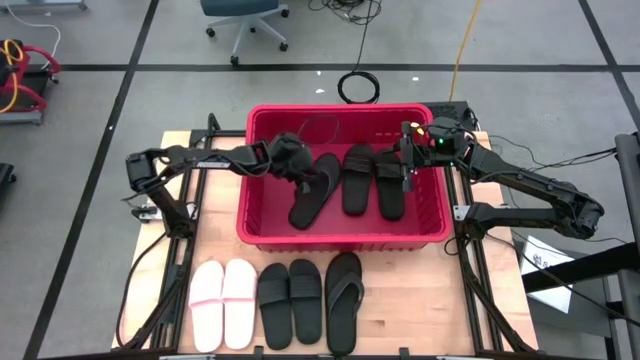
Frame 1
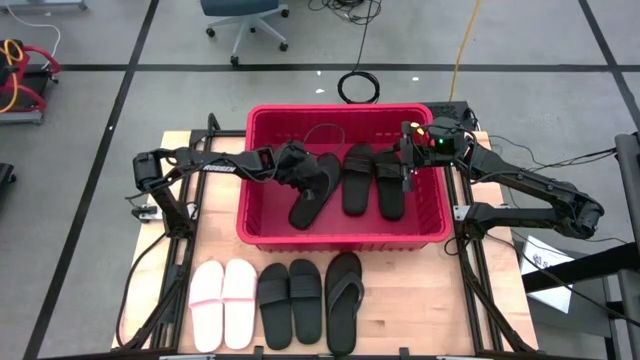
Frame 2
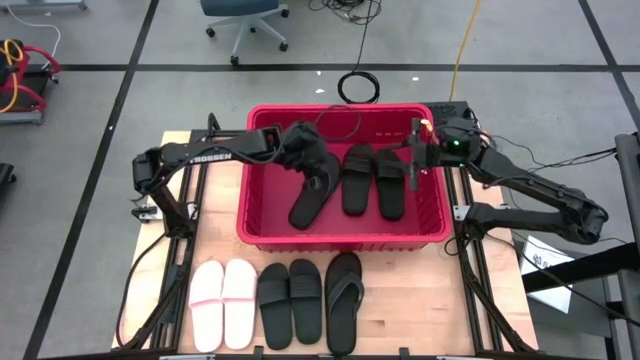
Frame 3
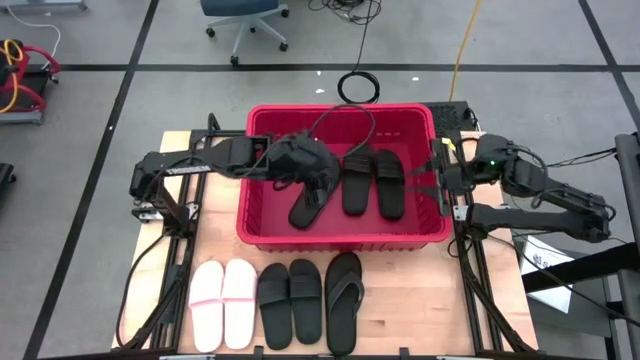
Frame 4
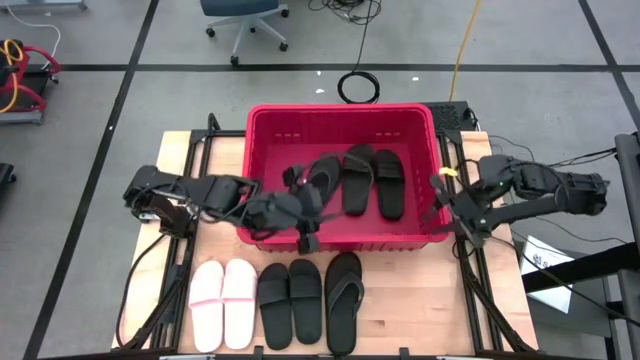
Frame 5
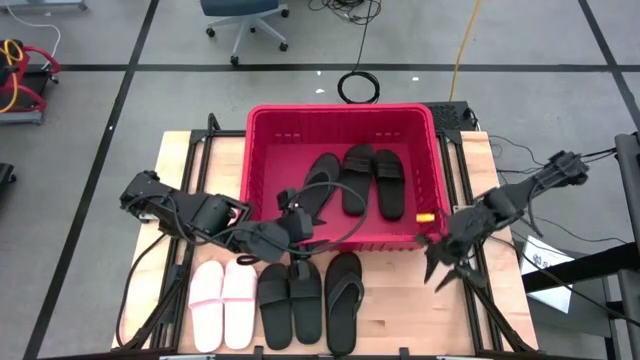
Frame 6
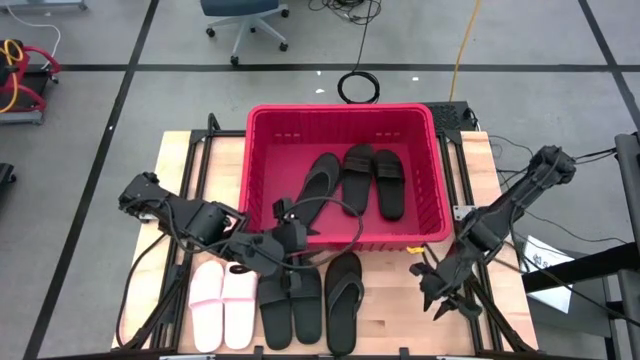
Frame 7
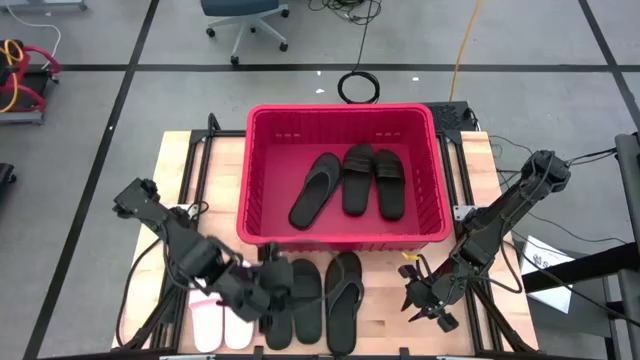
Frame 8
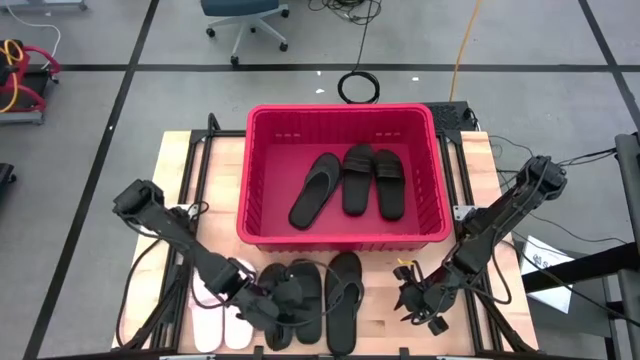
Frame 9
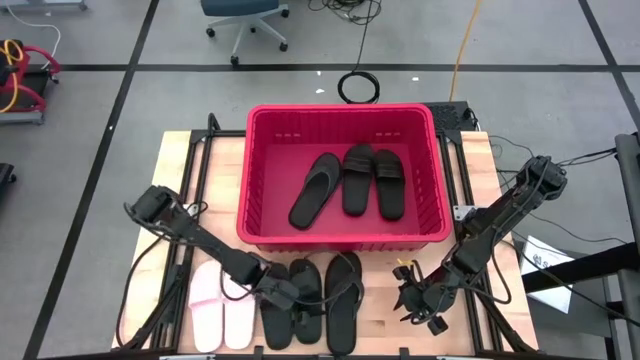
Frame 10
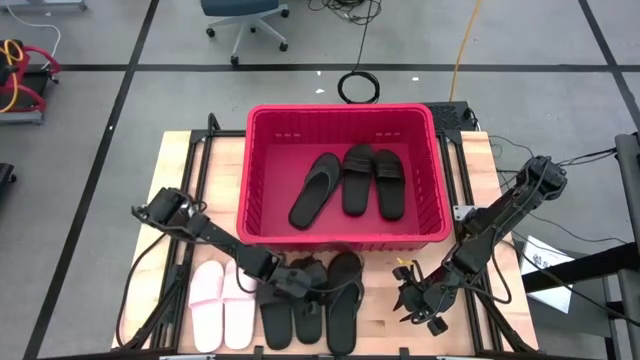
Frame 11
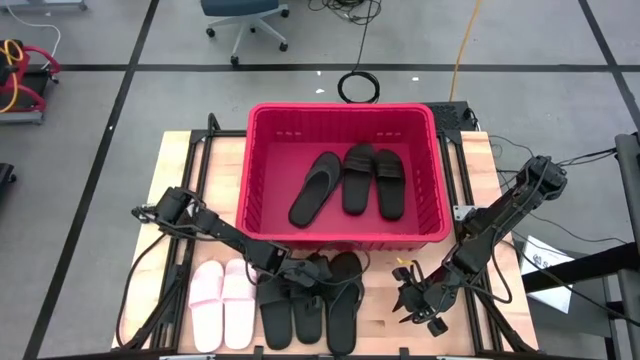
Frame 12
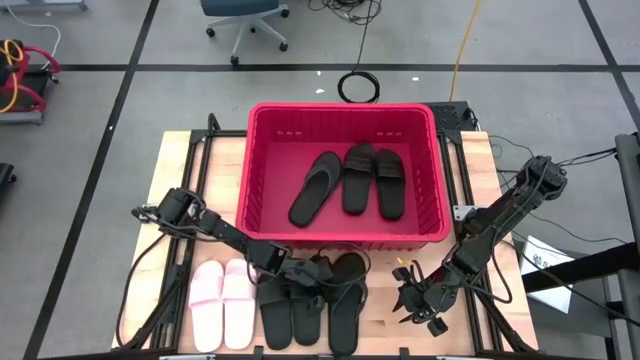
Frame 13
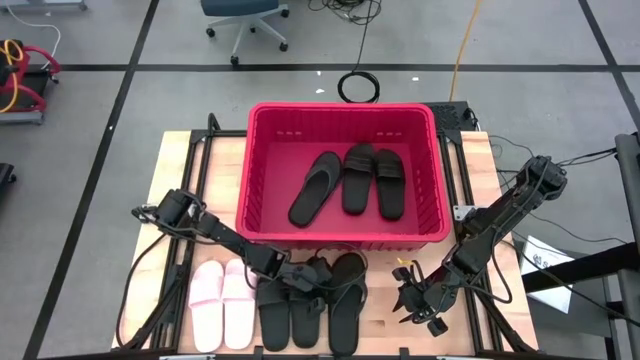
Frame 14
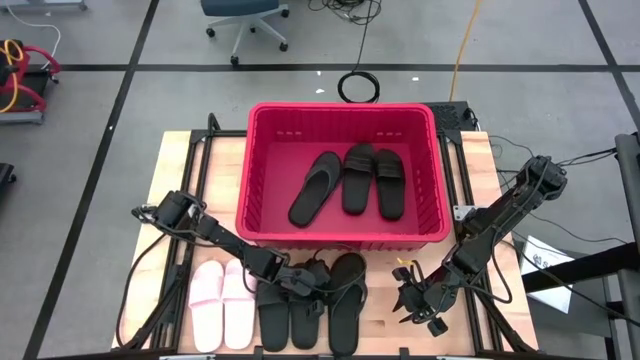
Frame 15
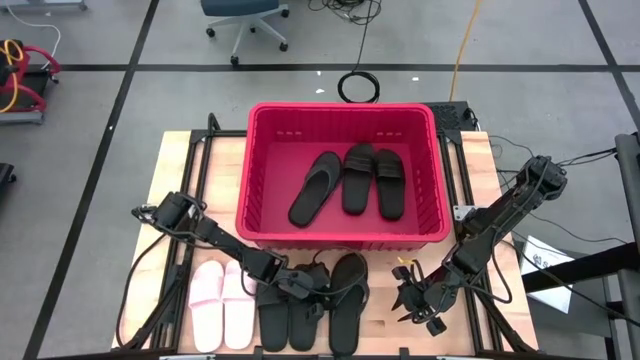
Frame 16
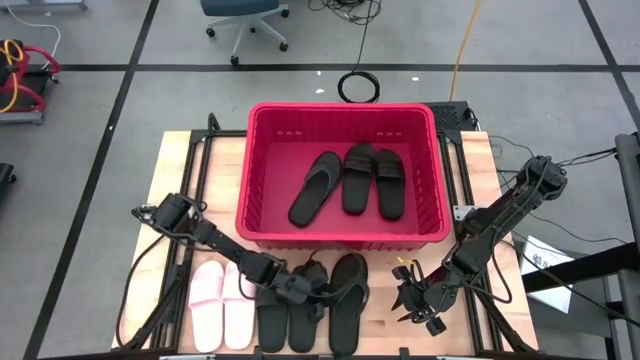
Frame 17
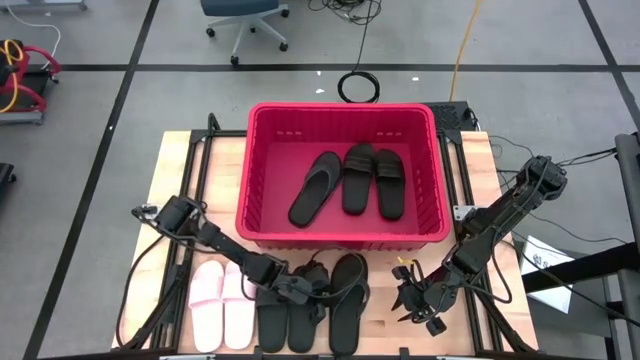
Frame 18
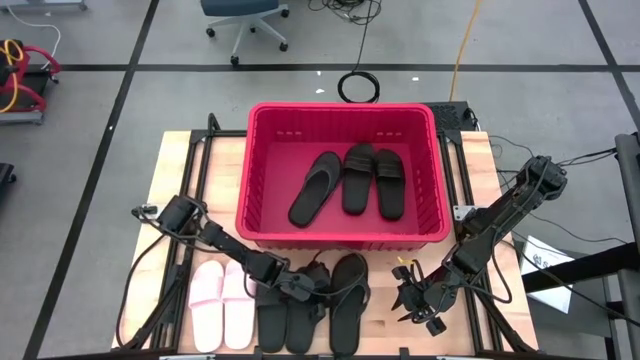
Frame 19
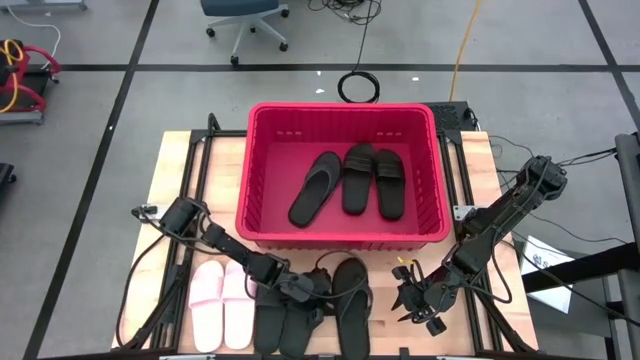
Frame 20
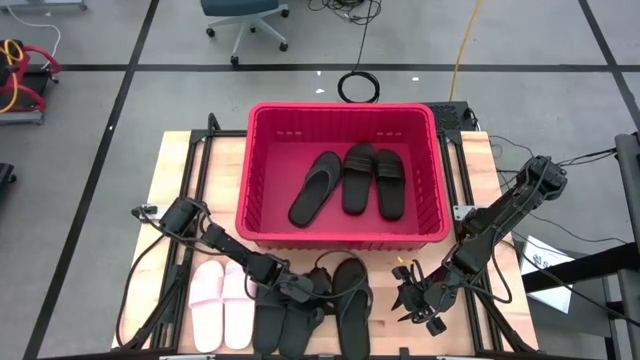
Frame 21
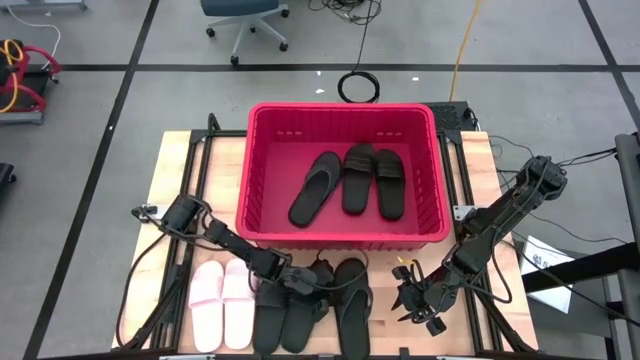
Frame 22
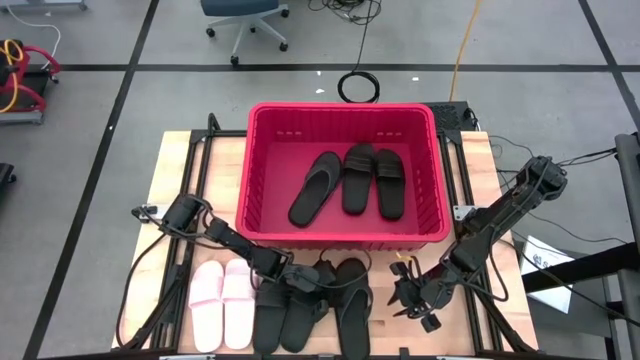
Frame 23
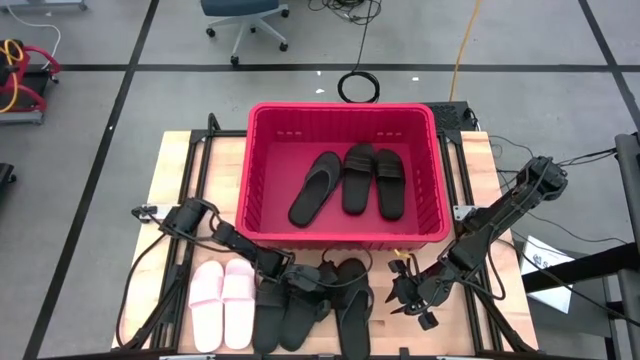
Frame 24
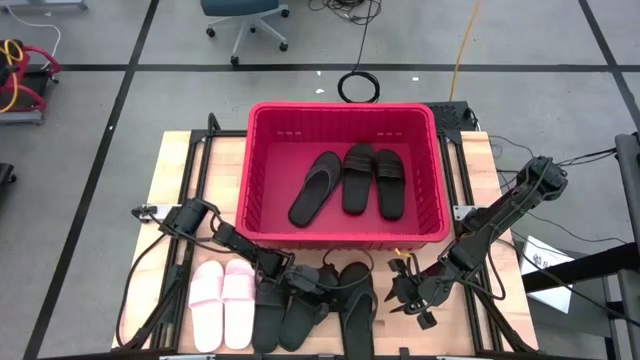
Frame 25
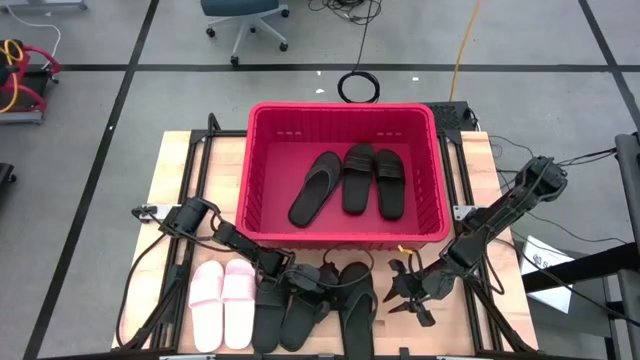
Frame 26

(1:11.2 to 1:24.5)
Task: Pick and place slides into bin
Put the black slipper into the red bin

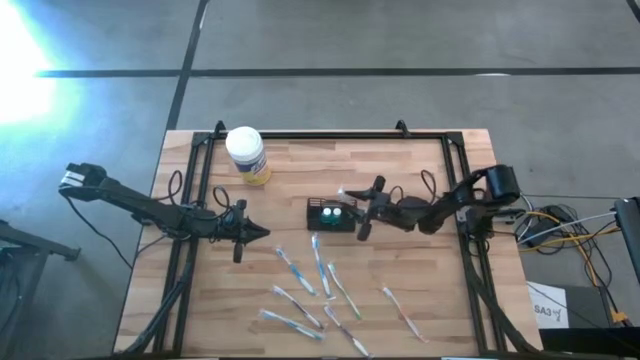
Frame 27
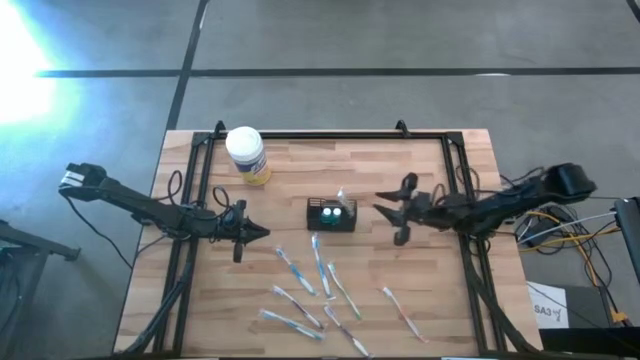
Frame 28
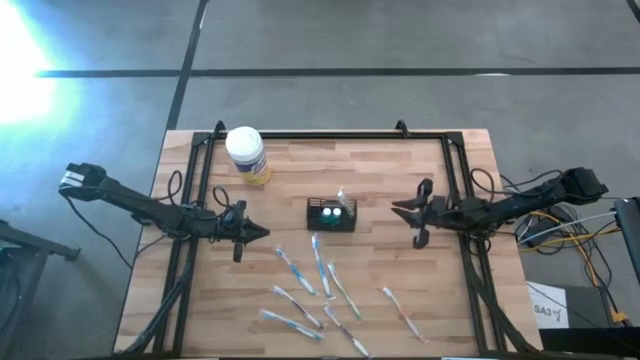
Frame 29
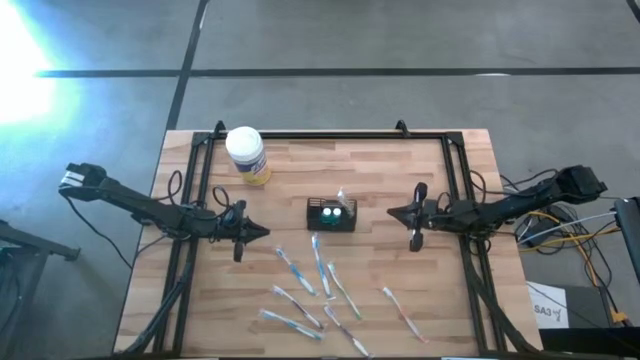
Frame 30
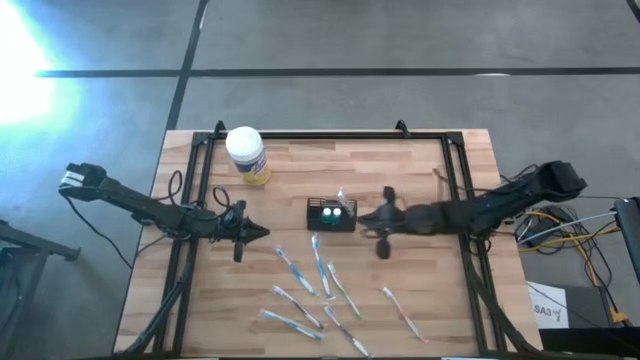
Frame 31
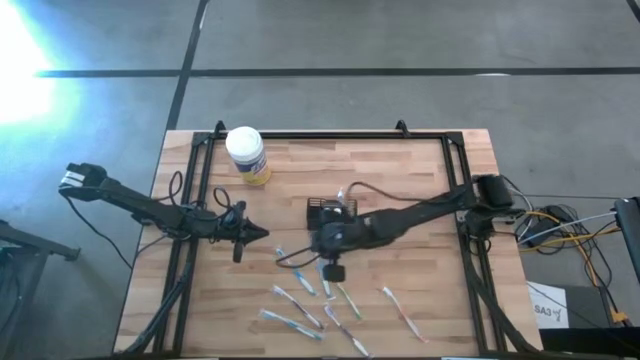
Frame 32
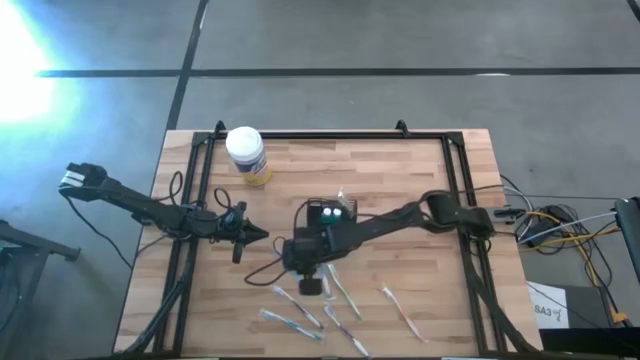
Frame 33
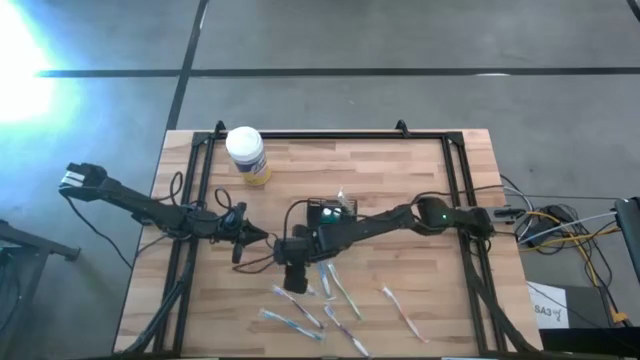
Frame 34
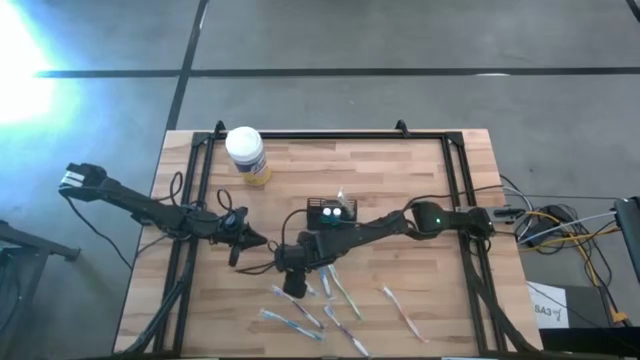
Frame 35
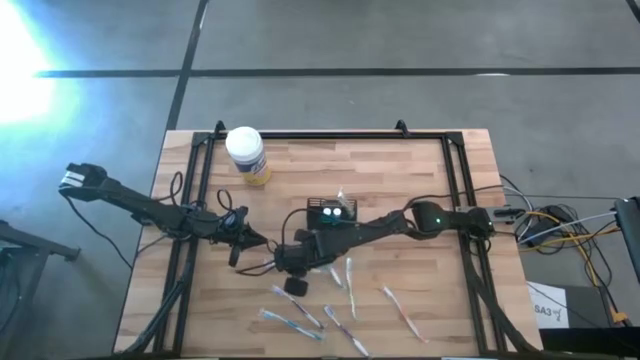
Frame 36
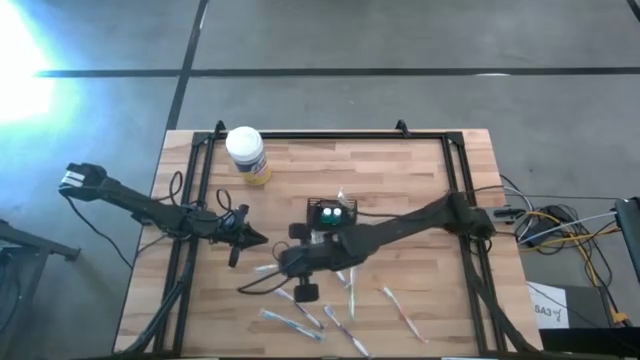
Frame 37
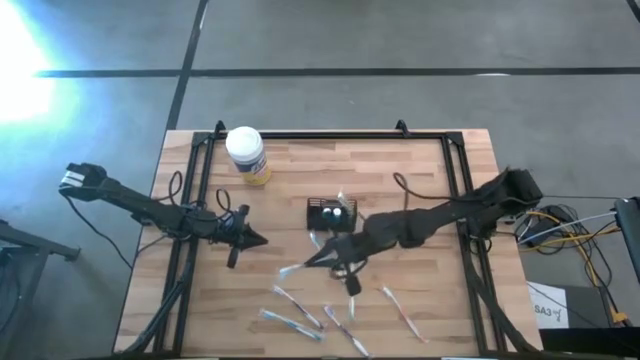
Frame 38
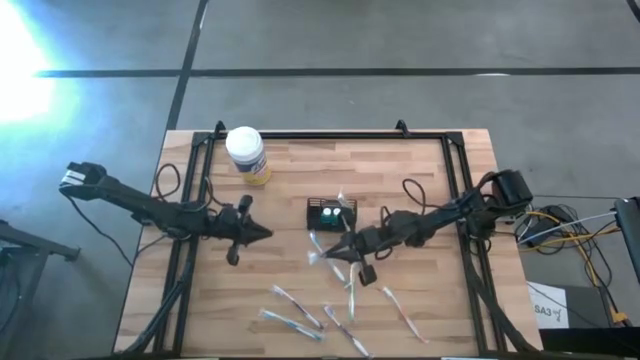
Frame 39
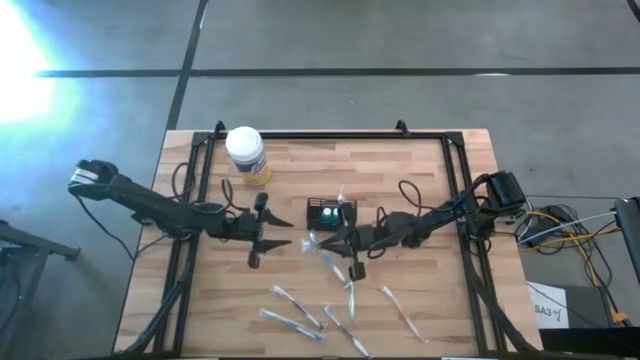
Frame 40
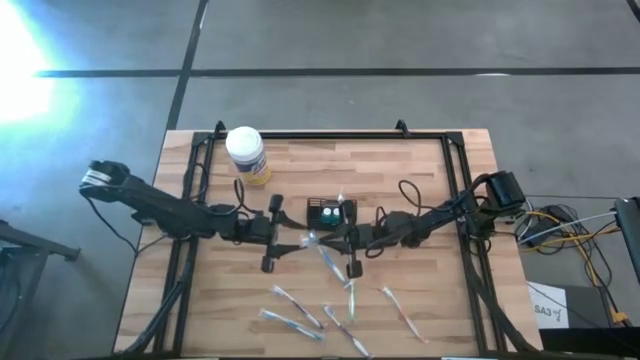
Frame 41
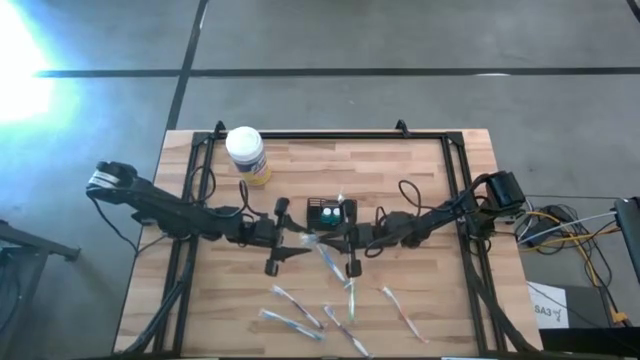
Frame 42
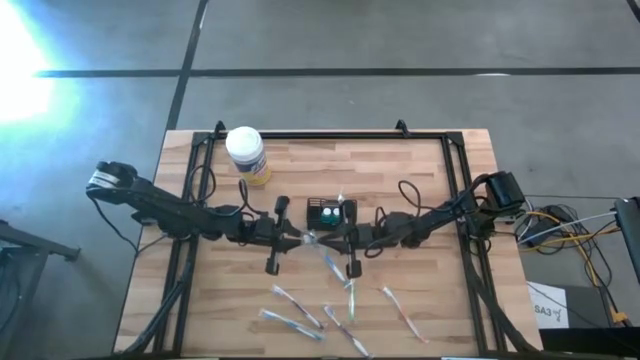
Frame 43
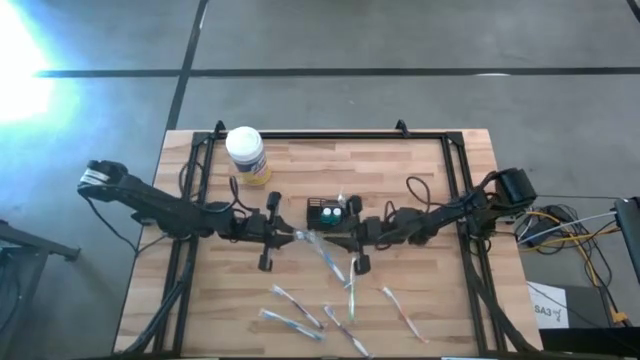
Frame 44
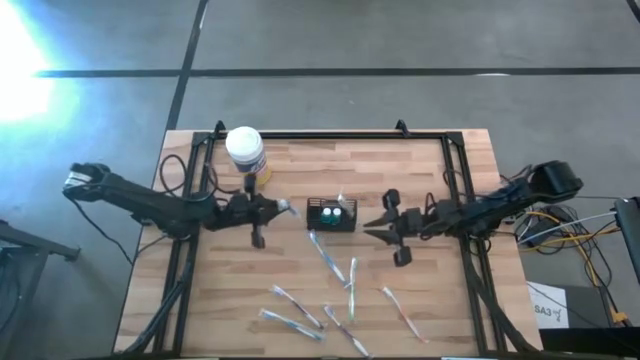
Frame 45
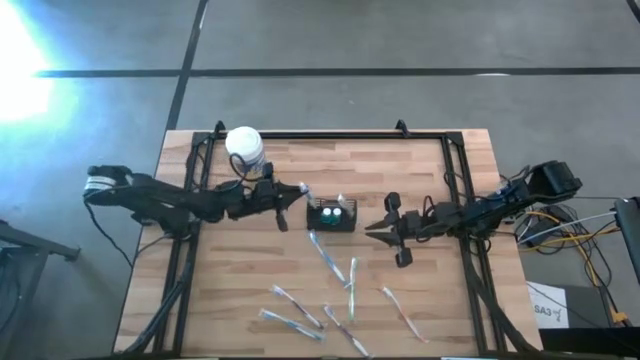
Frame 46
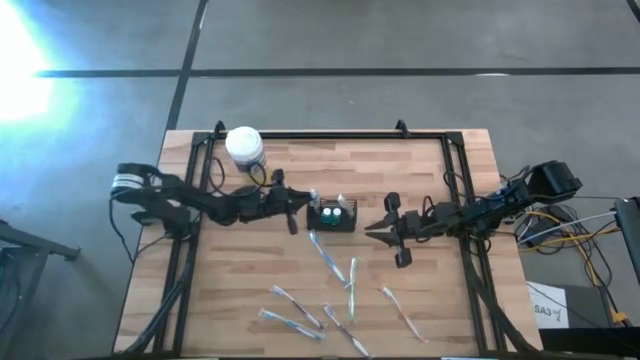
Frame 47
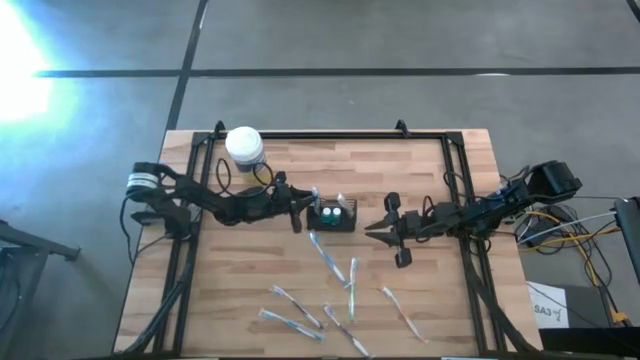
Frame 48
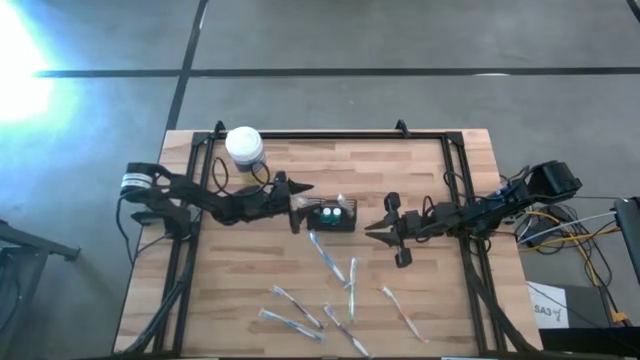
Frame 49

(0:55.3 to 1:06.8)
Task: Pick & Place toothbrushing station
Put the top left blue toothbrush into the black mesh organizer
